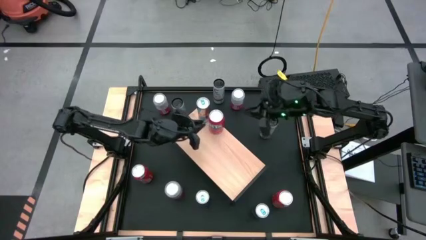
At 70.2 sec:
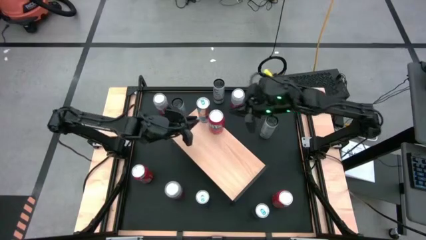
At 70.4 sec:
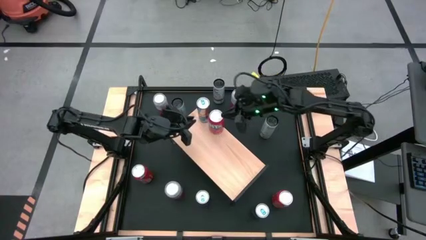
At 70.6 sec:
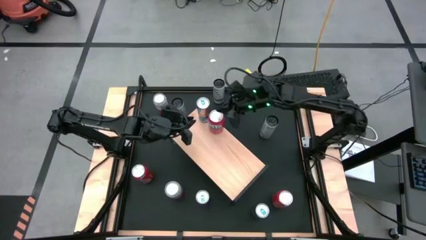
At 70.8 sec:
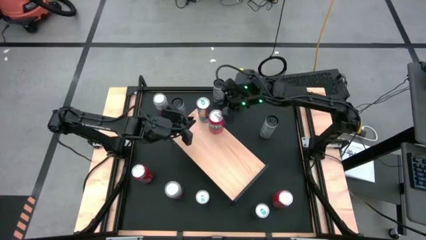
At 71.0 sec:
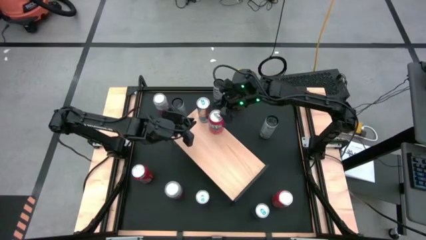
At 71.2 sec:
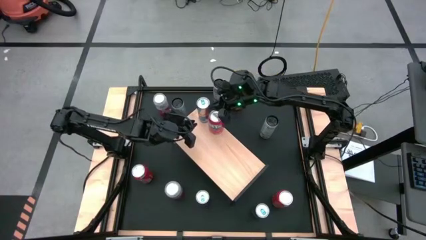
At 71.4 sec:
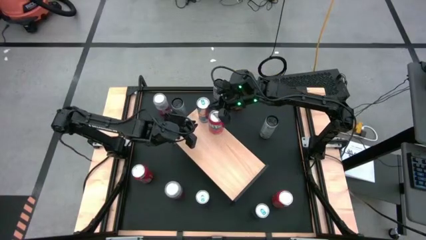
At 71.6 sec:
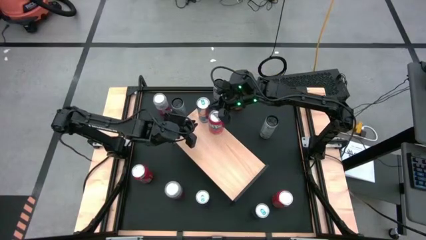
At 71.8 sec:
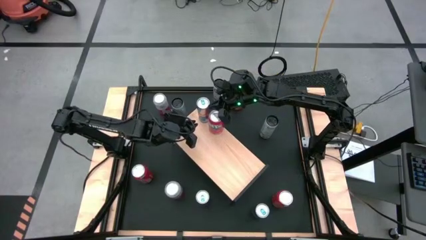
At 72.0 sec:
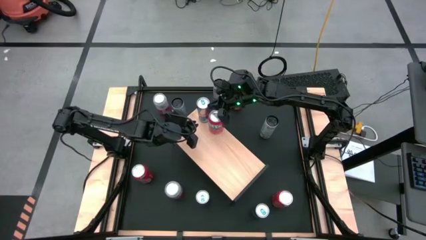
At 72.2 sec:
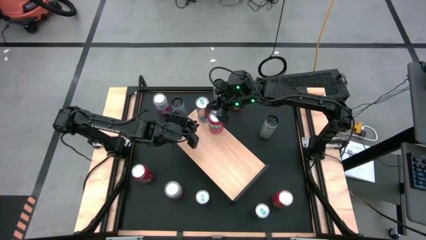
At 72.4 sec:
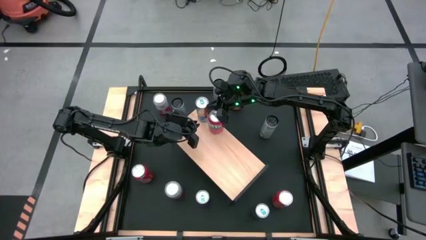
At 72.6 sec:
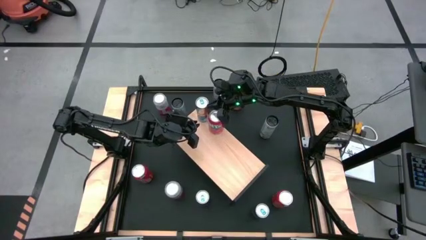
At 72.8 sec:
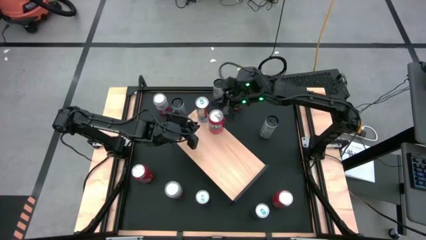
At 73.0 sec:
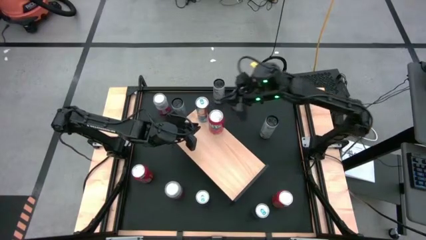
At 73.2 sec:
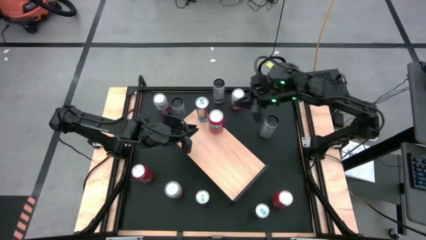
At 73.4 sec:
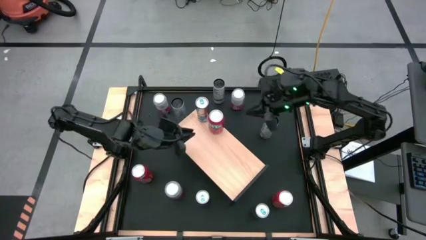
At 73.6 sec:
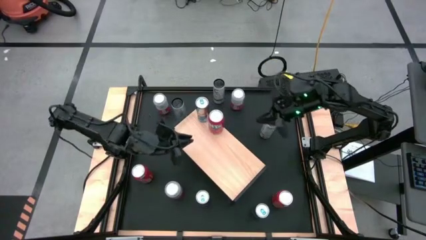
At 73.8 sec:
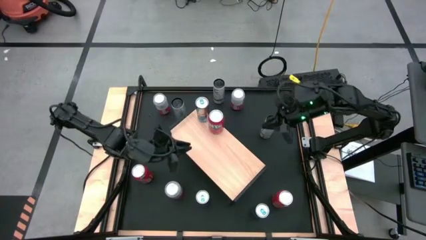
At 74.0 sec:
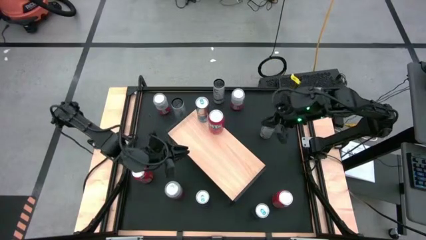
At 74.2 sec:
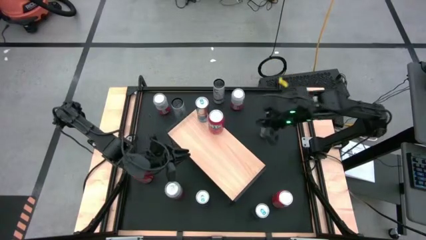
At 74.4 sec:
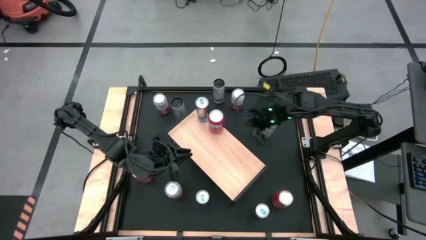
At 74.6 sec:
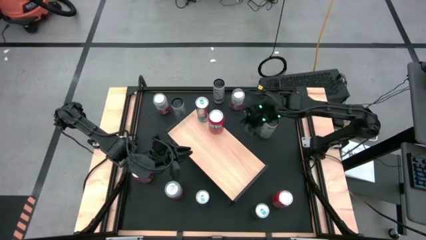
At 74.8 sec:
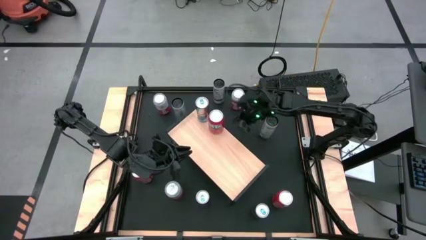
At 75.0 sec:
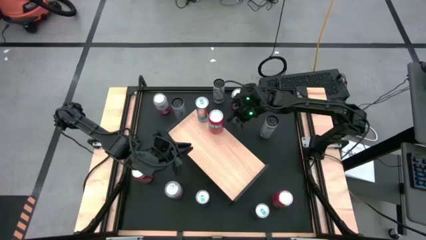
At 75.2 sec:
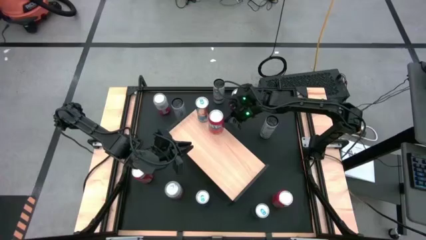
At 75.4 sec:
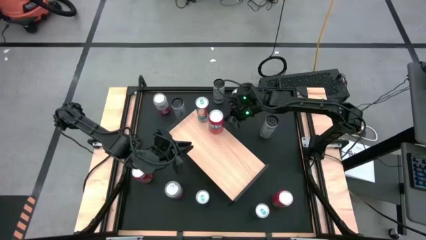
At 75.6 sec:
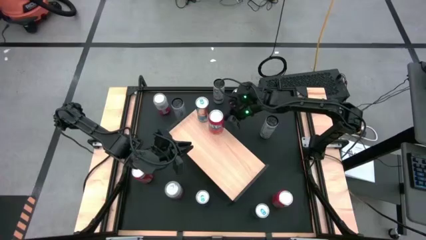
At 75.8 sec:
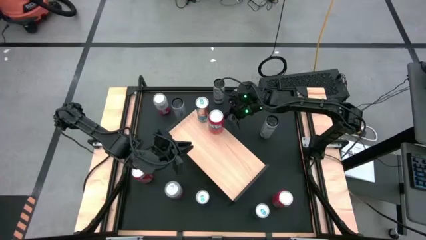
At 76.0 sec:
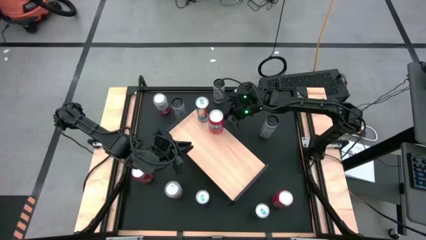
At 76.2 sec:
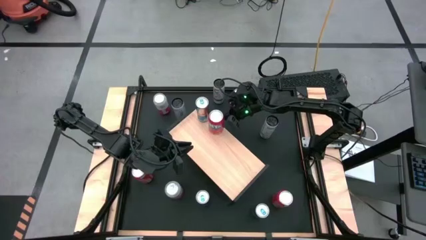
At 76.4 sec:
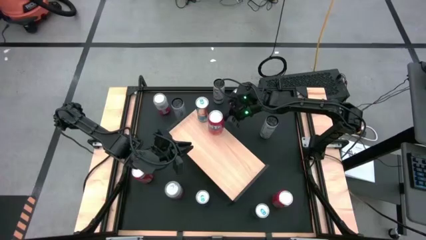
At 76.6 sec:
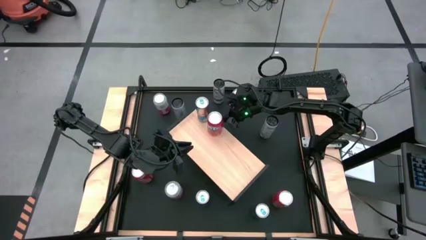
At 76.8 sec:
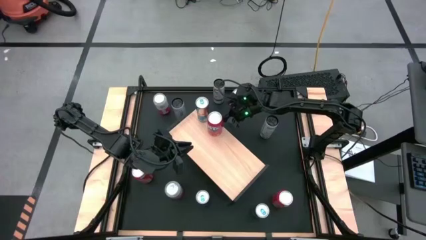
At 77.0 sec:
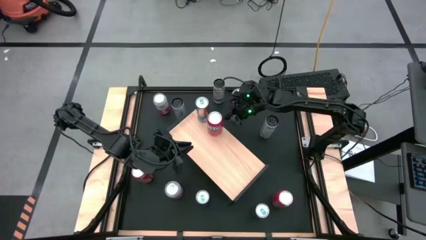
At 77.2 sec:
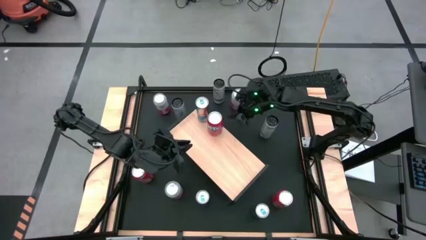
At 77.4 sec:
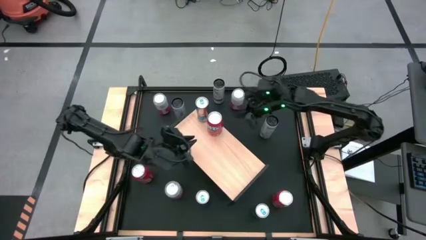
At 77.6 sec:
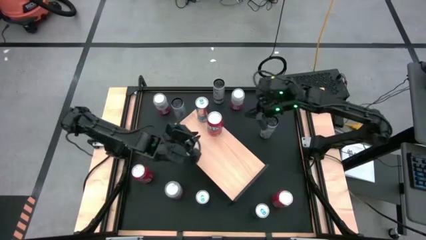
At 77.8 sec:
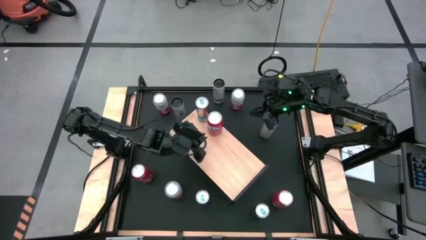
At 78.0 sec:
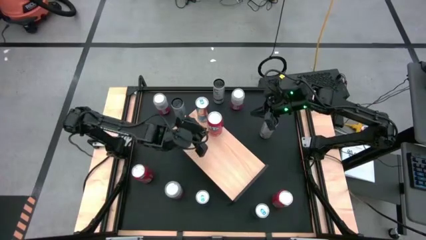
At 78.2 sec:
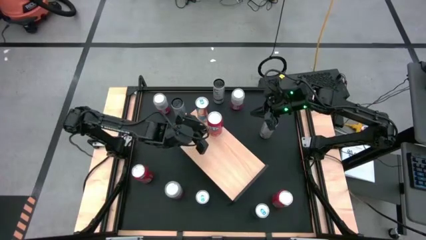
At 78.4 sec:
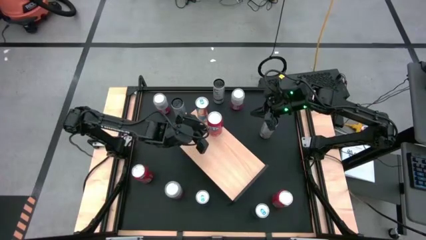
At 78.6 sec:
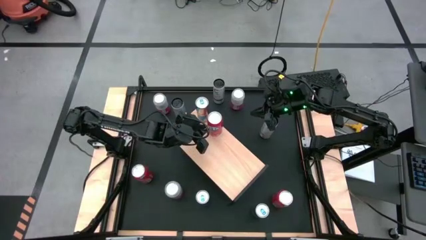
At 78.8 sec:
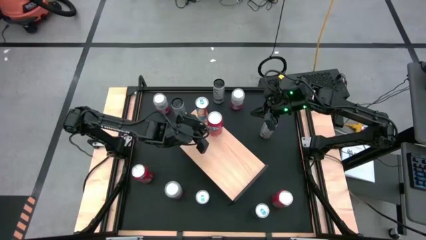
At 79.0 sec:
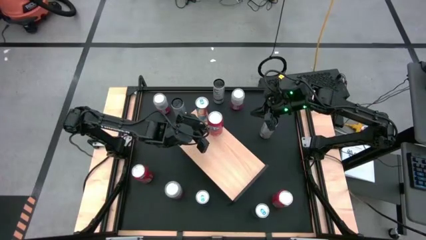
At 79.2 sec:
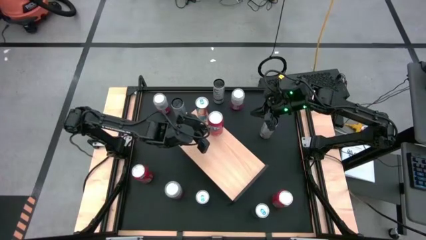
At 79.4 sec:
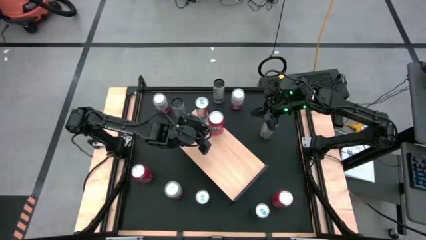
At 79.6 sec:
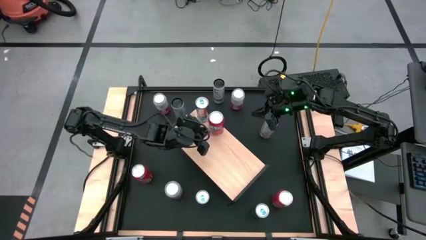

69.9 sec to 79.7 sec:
Task: Place canned beverage on shelf
Adjust the soda cans on the shelf

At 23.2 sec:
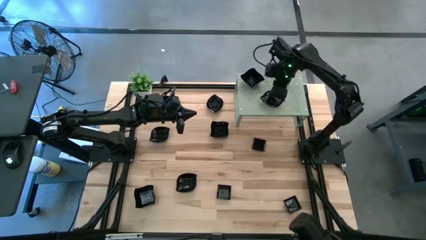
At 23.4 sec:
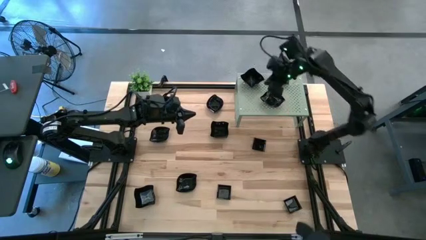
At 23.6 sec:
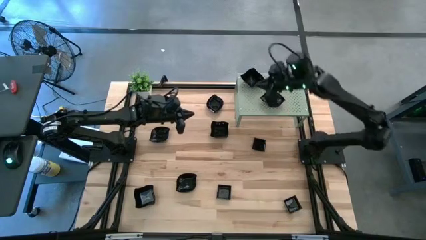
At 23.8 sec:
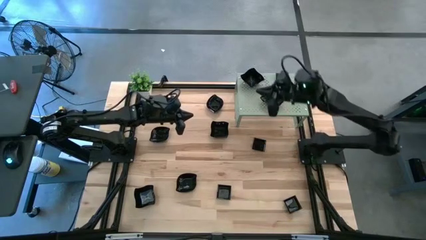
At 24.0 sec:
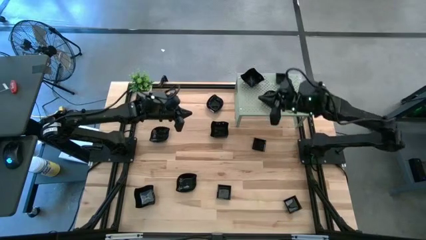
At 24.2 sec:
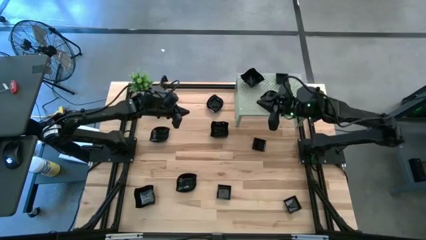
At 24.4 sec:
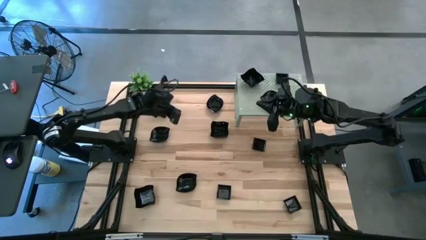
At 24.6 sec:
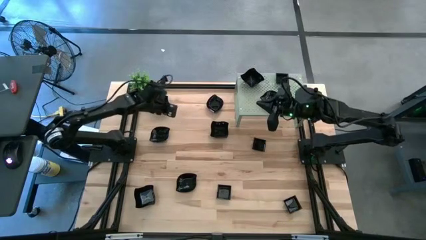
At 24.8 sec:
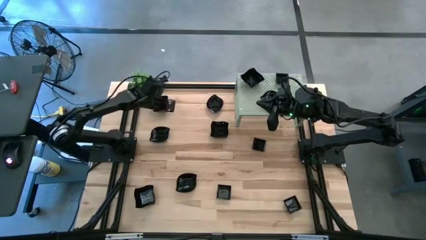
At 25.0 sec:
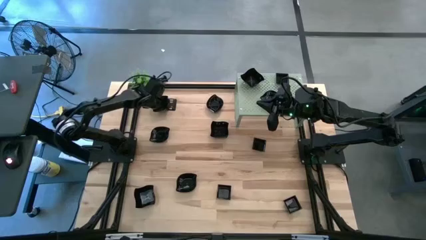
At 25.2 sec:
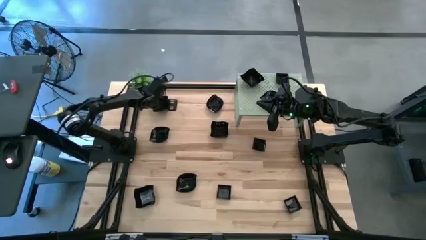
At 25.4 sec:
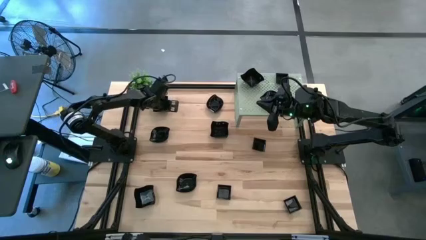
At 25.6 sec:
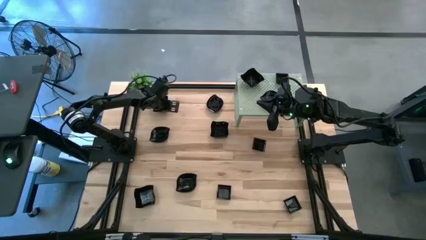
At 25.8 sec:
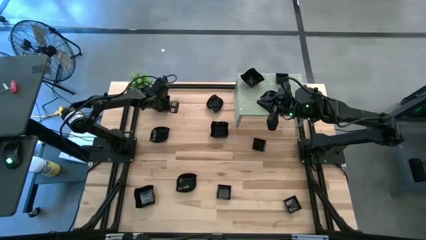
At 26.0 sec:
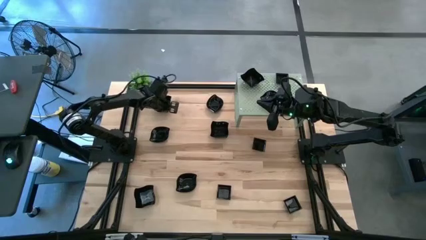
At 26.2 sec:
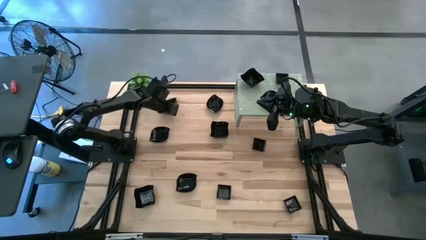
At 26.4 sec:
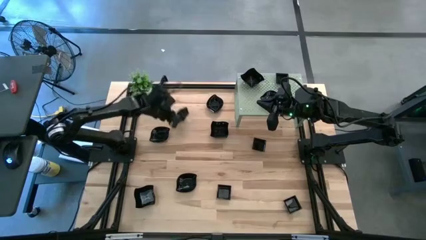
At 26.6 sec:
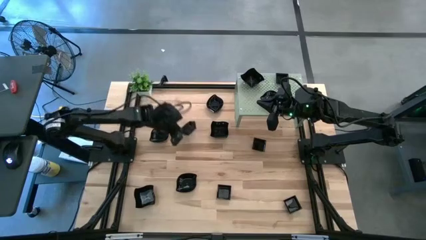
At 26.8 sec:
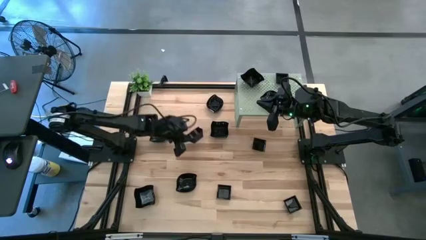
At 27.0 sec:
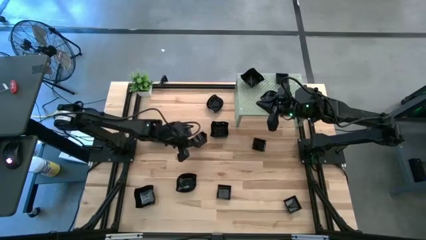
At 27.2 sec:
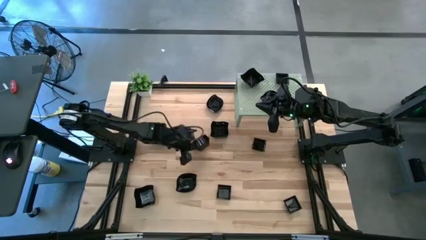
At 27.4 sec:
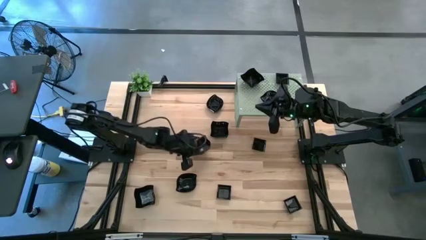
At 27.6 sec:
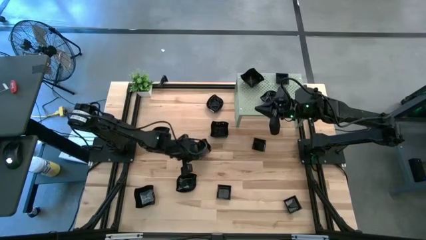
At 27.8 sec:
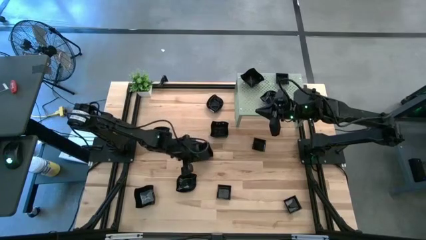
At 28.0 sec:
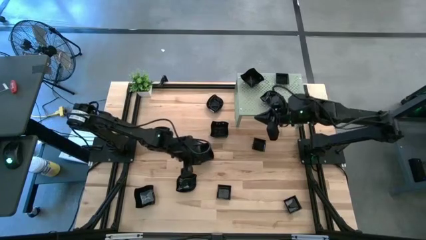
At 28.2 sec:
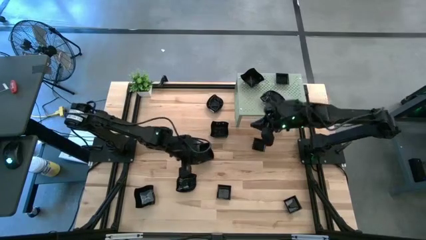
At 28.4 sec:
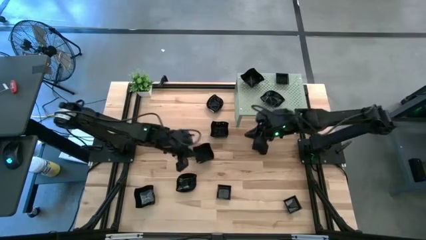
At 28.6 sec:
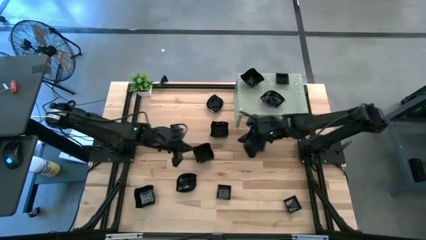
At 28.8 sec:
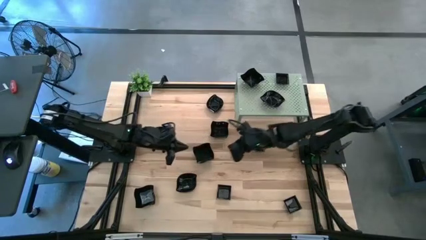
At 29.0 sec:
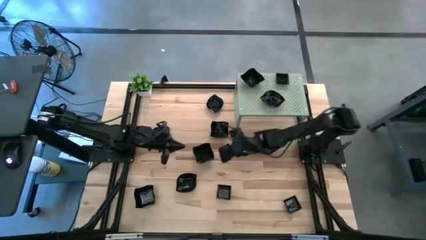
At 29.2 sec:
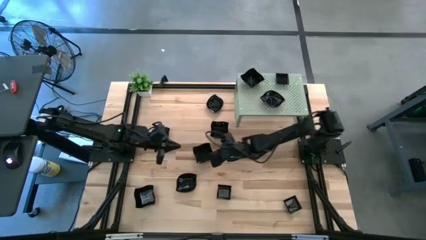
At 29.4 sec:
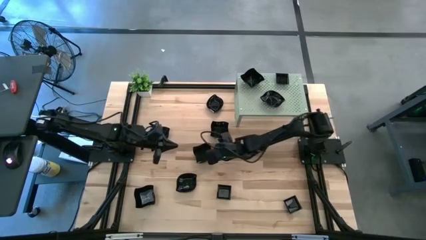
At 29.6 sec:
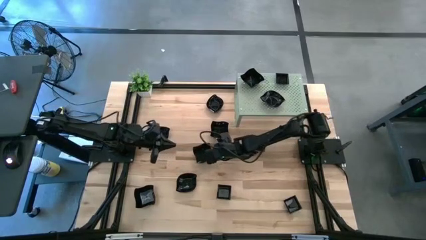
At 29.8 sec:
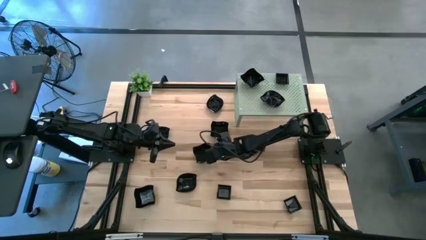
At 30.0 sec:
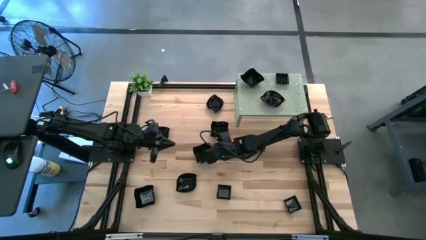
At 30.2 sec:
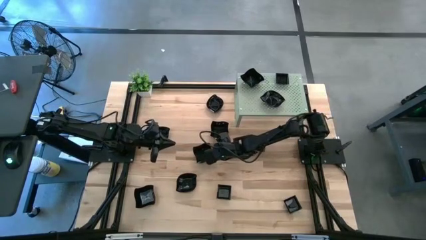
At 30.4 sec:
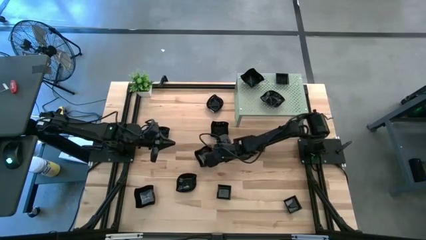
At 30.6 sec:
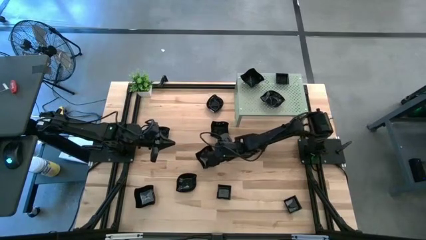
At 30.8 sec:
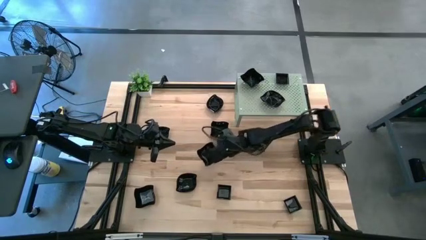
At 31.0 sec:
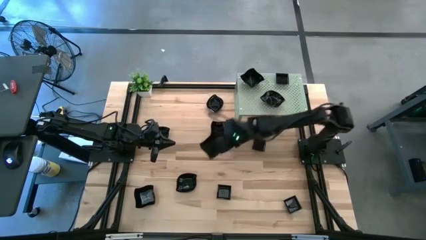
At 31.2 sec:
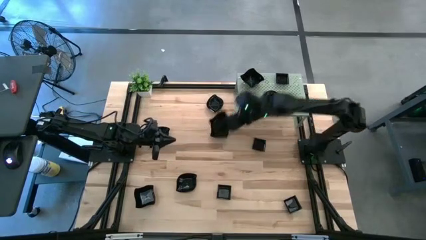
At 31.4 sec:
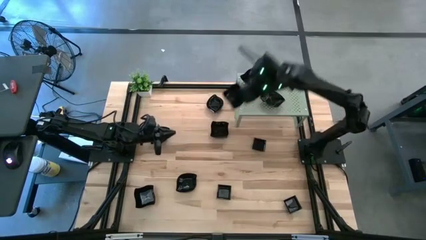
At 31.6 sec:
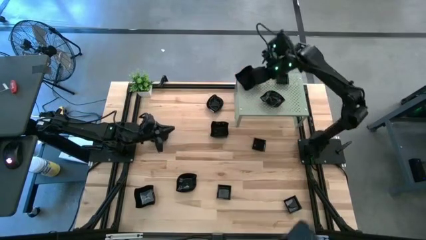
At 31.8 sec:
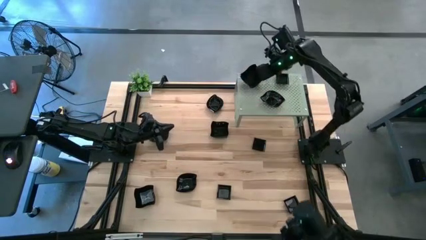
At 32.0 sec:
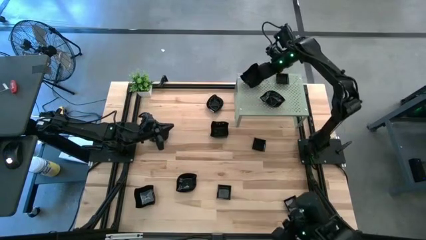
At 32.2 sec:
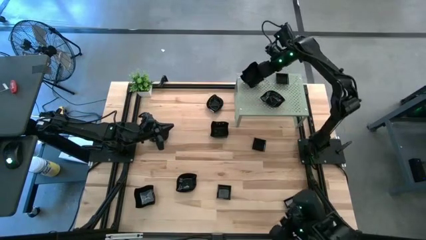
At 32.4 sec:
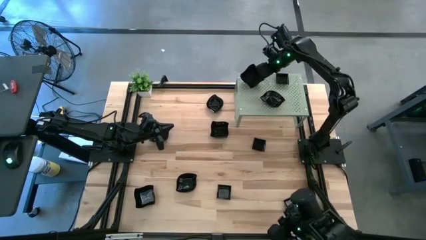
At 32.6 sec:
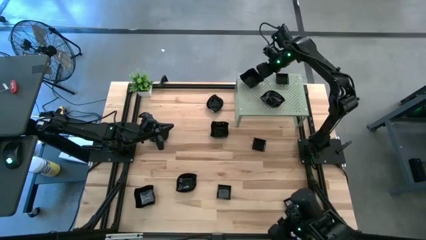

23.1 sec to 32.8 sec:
Task: Pick & Place Mini shaped plates
Stack the distorted square plate on top of the distorted square plate on the shelf
